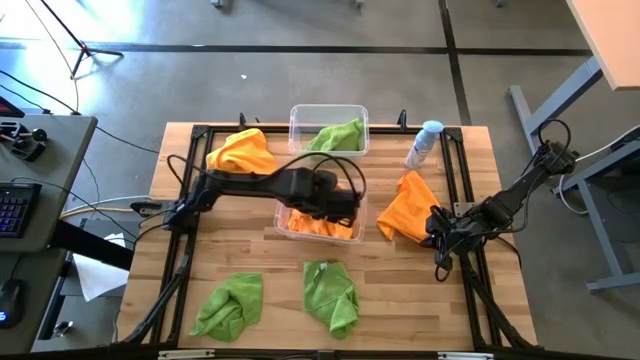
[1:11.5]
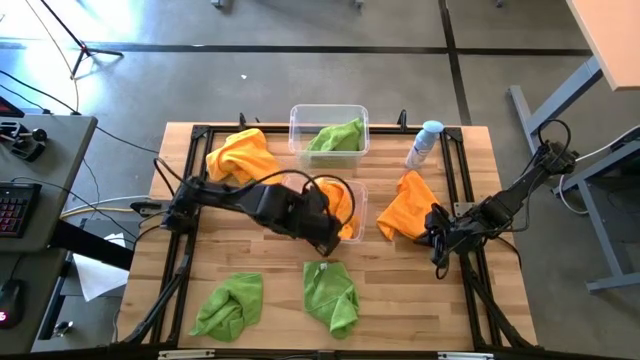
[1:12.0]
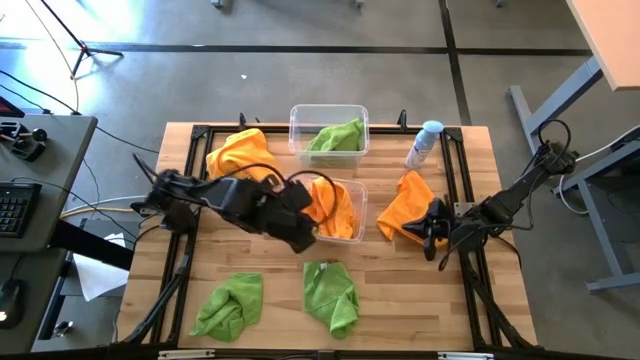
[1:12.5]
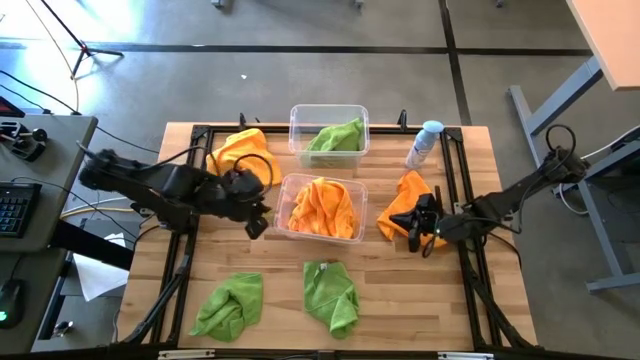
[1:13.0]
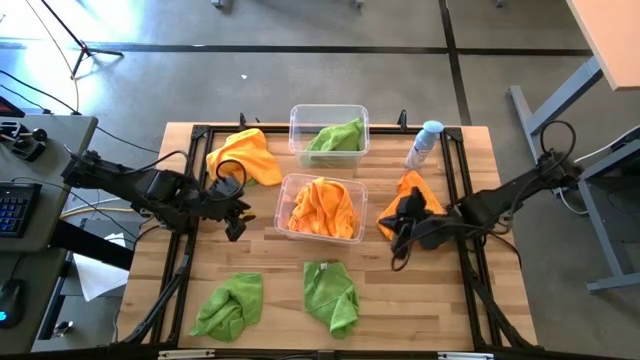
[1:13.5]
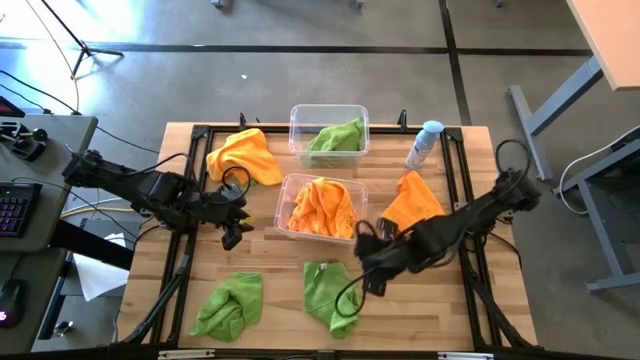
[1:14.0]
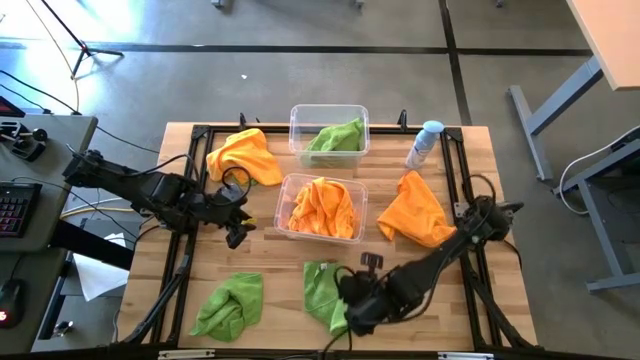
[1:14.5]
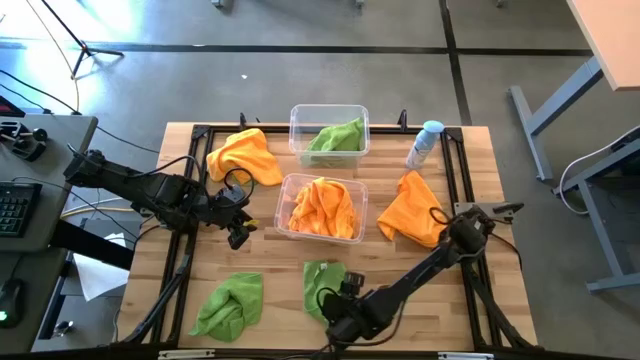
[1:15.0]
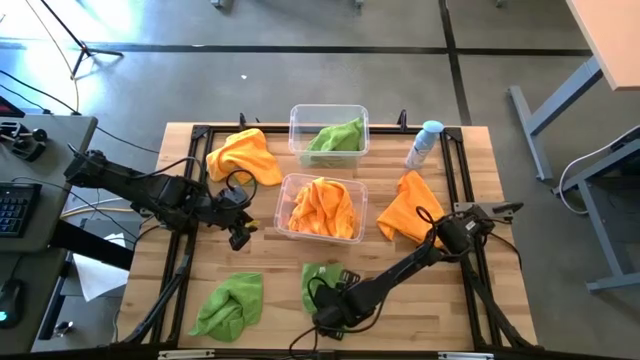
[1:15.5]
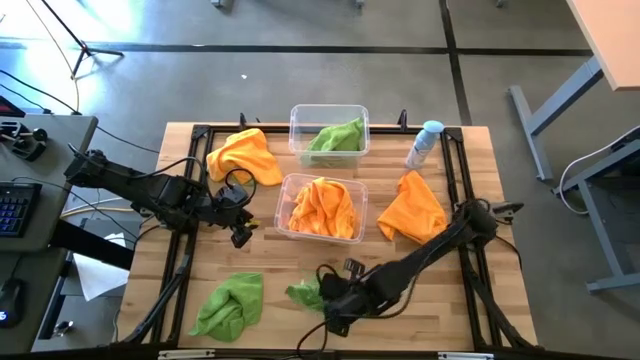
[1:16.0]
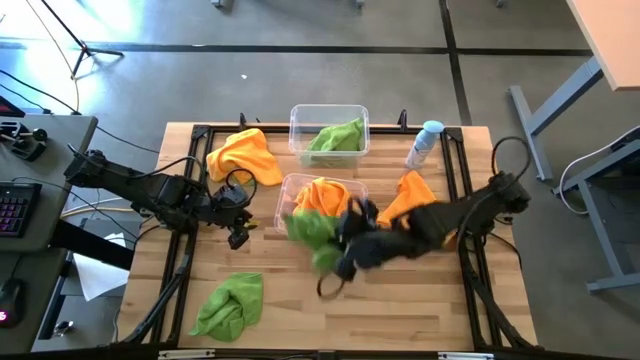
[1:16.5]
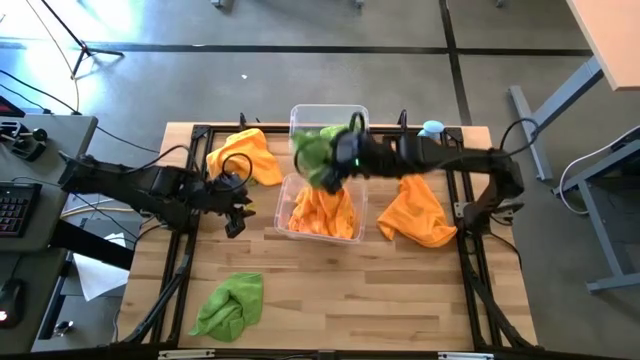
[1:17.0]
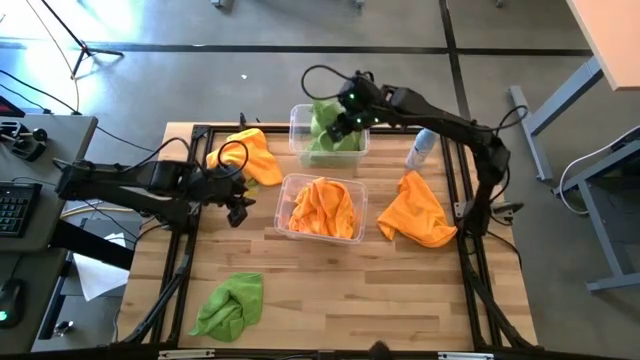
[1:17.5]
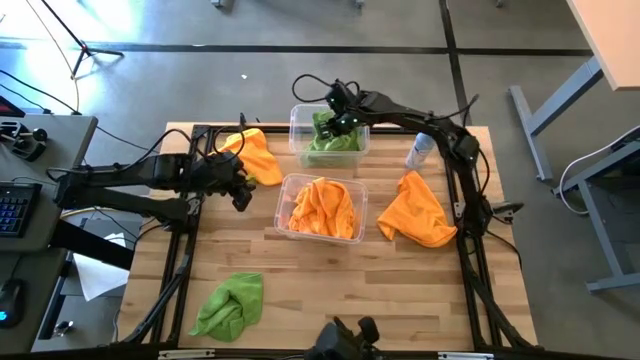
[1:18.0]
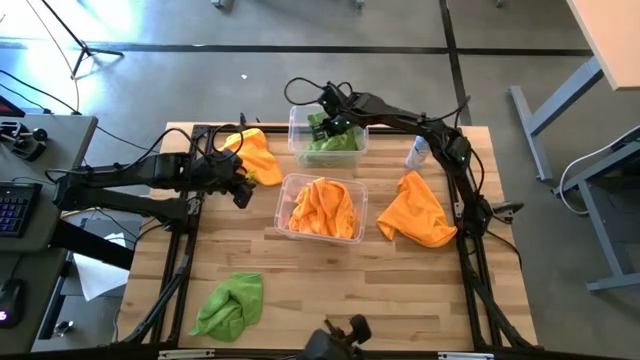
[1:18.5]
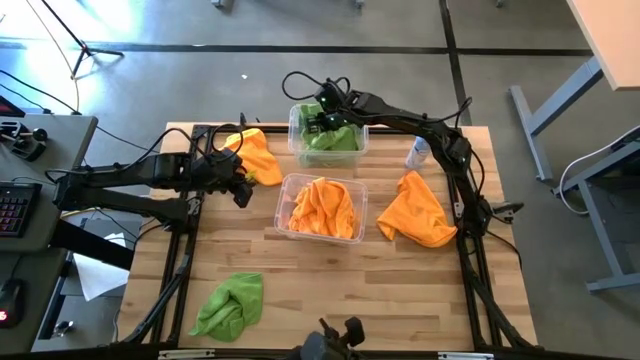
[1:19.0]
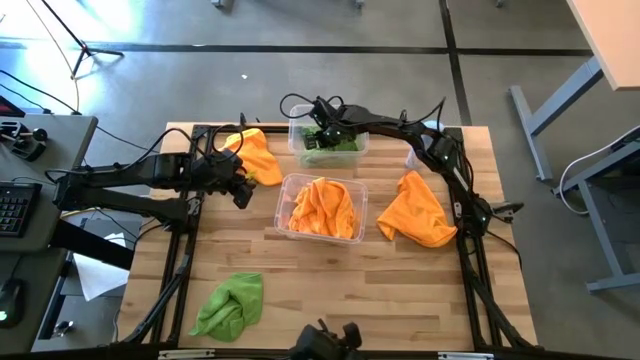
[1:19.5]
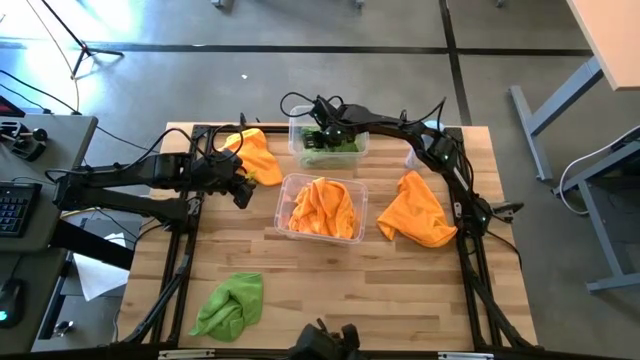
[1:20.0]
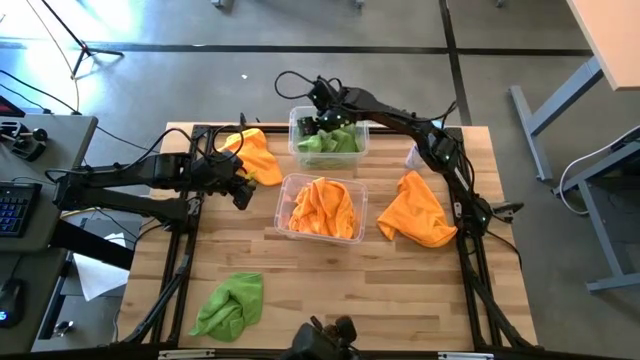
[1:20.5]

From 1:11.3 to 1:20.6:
Task: Sort microfiber towel by color & place in baskets
Put the green microfiber towel into the top transparent bin

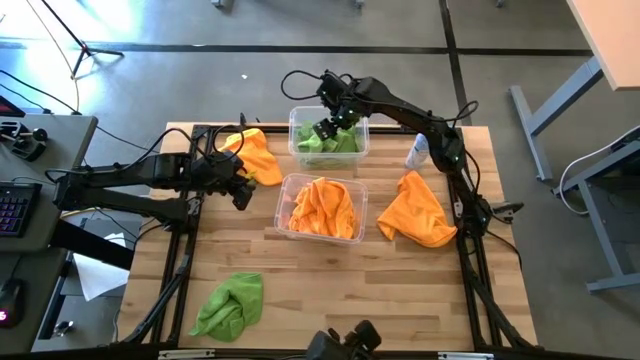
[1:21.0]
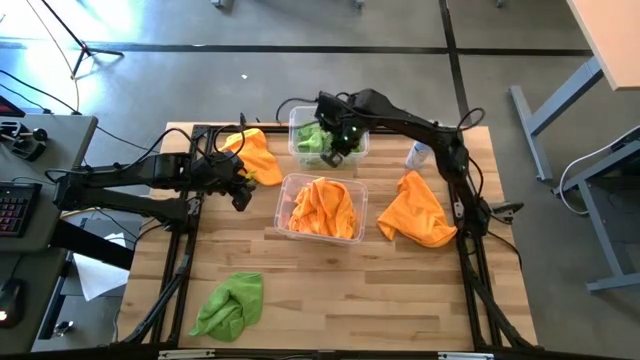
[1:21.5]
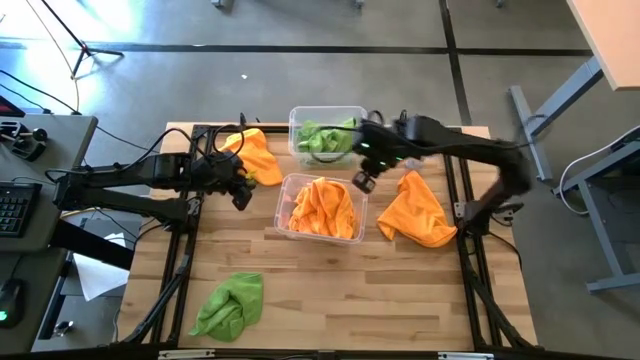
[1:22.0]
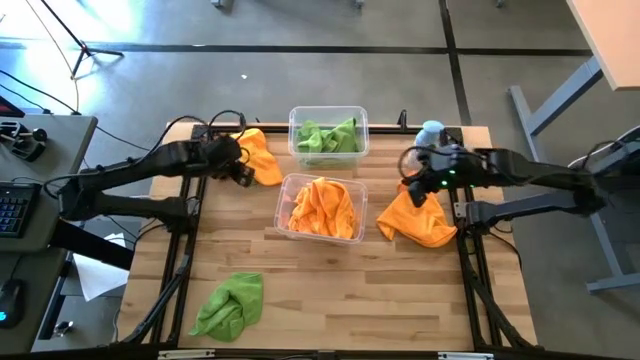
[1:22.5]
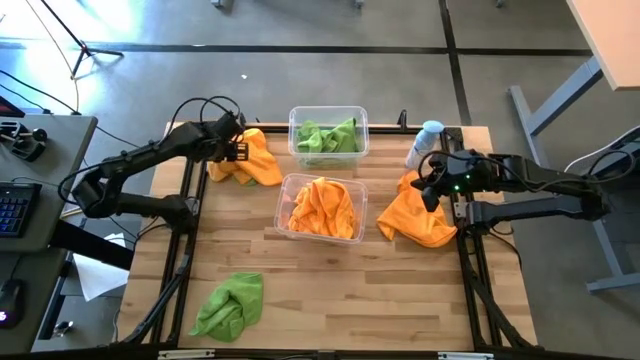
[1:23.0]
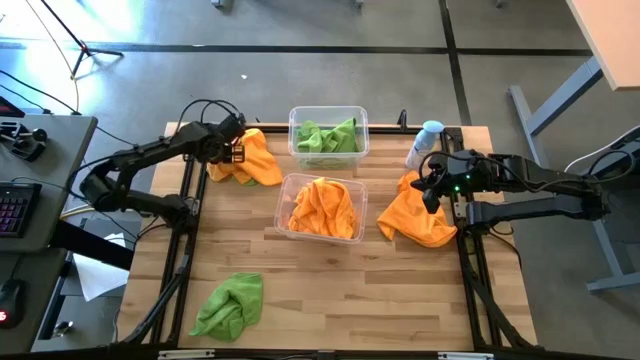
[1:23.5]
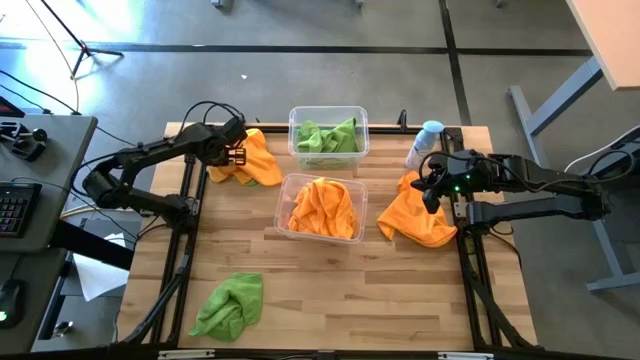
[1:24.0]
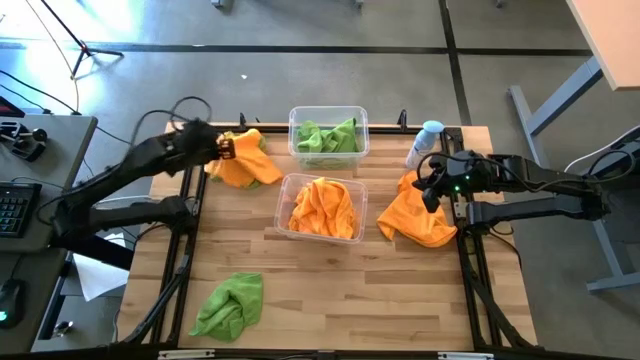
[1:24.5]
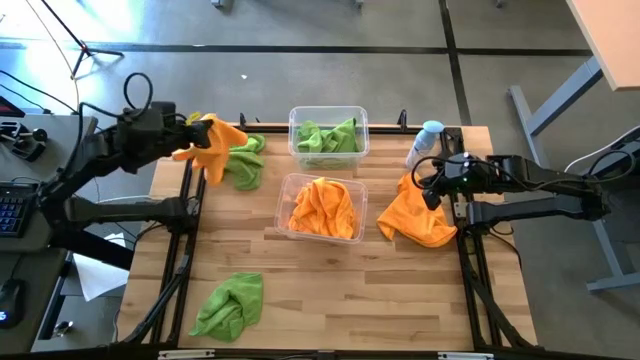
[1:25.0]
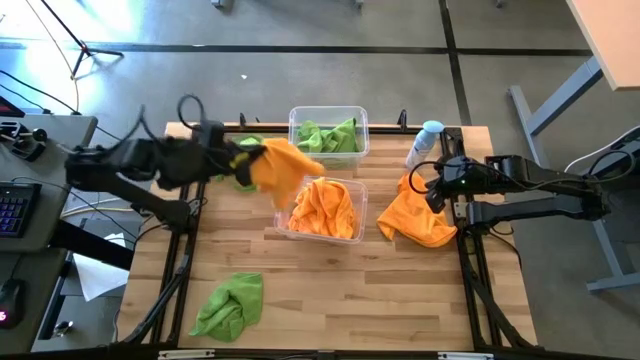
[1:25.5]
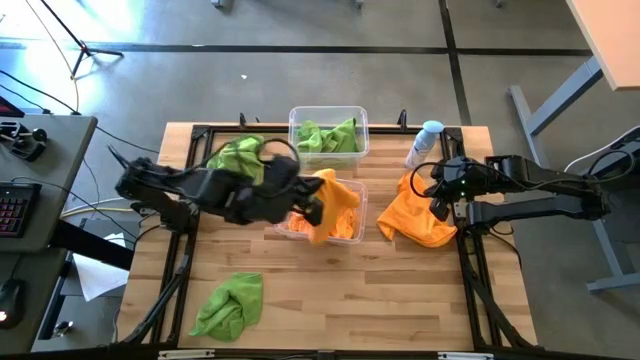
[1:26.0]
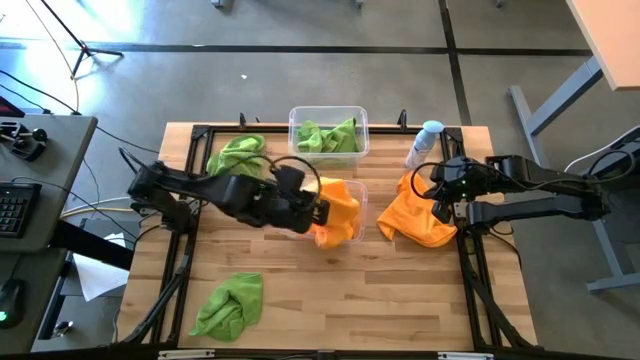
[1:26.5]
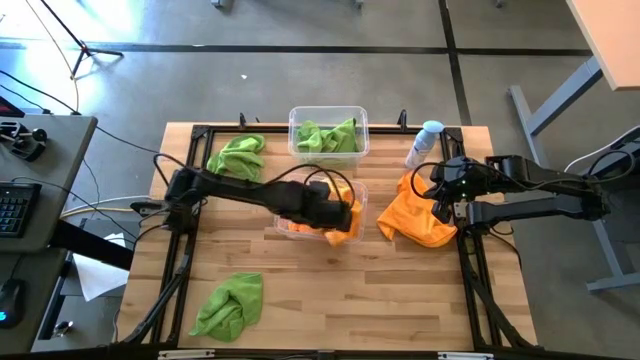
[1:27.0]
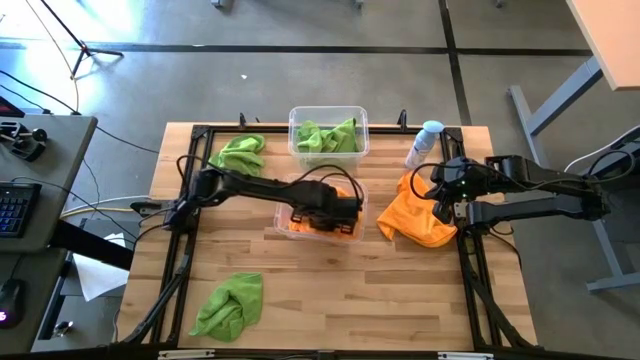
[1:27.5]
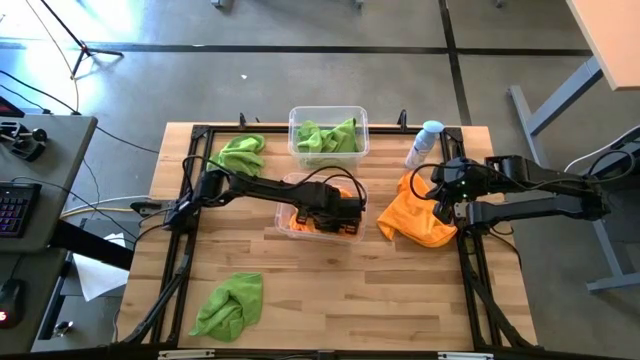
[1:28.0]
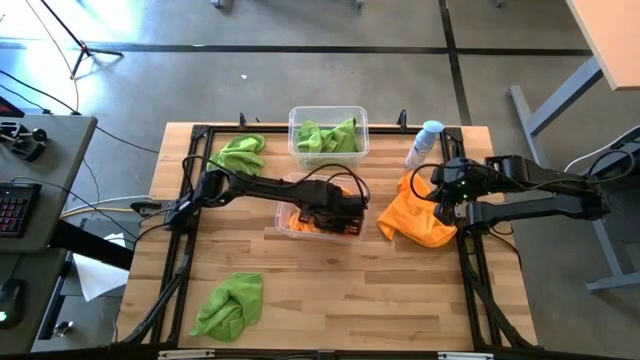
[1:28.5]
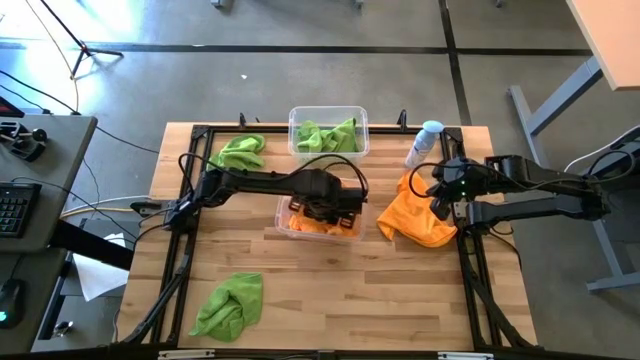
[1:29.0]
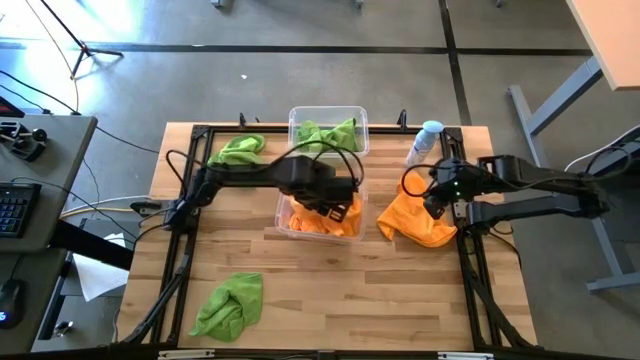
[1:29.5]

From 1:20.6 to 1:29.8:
Put the orange microfiber towel into the bottom transparent bin

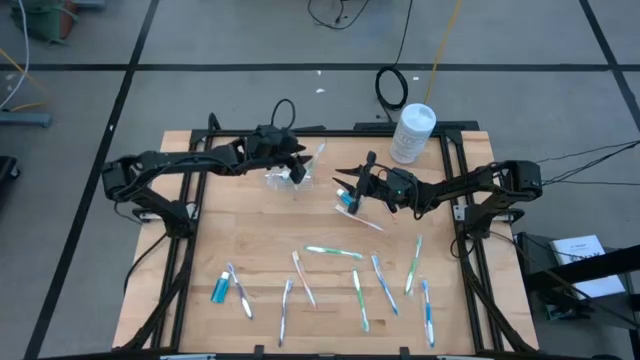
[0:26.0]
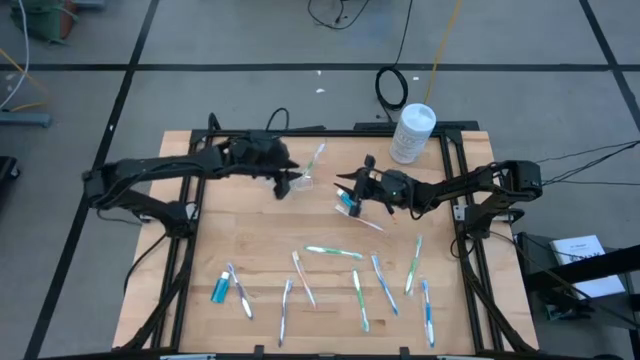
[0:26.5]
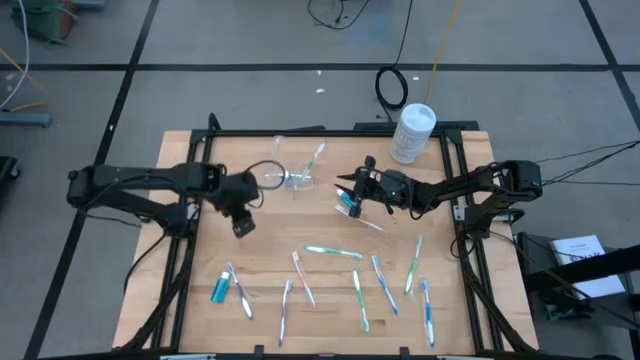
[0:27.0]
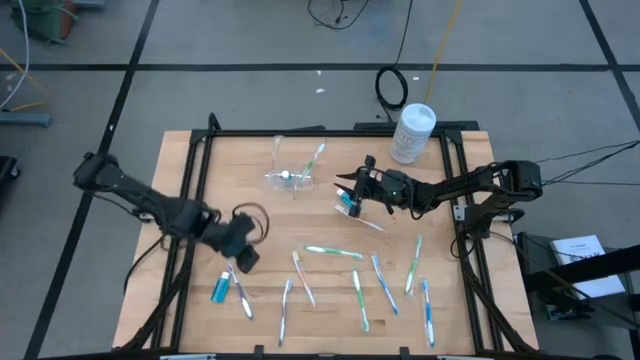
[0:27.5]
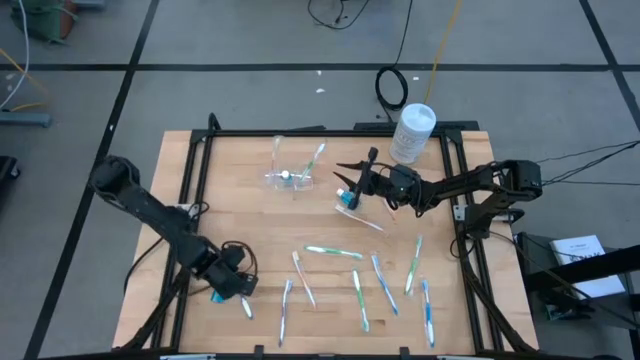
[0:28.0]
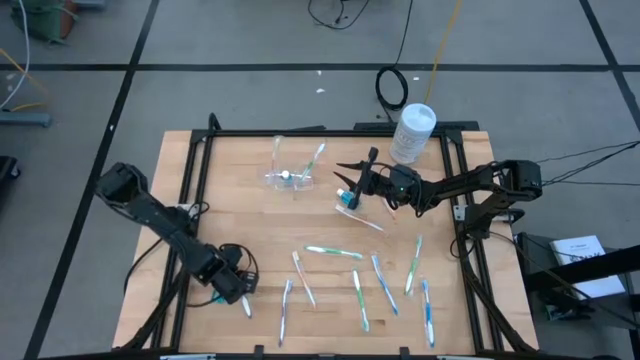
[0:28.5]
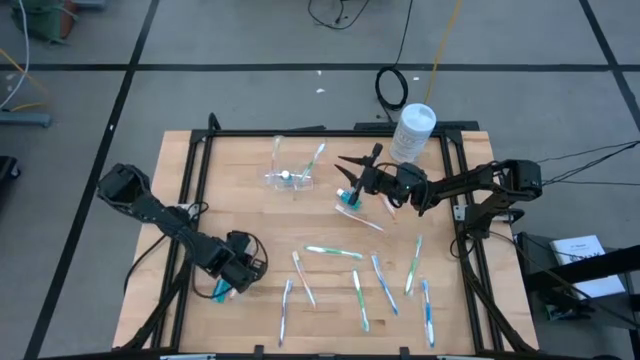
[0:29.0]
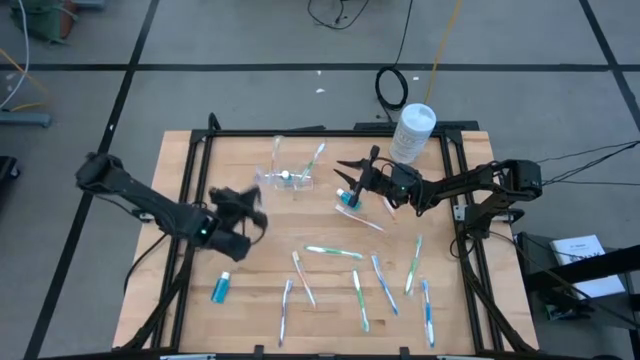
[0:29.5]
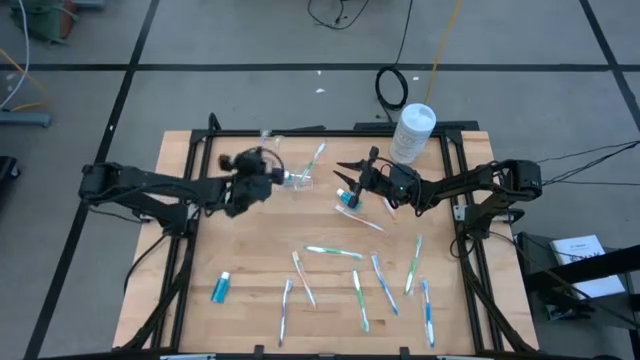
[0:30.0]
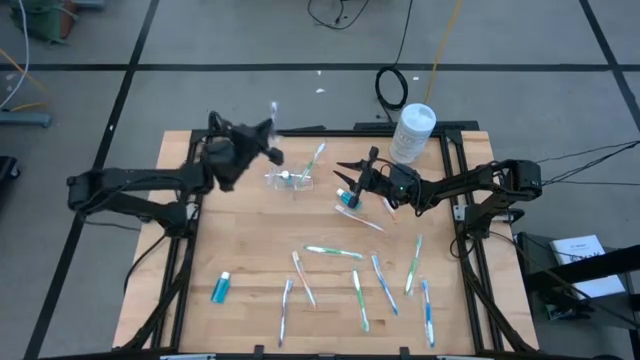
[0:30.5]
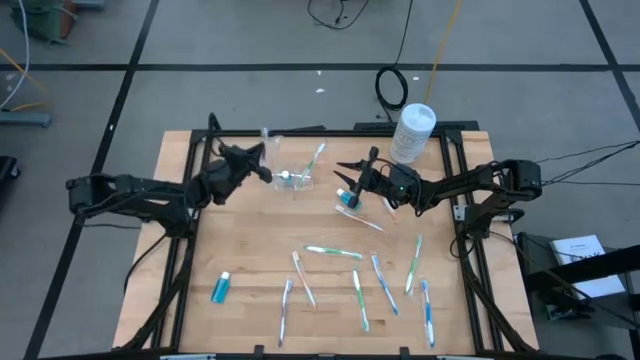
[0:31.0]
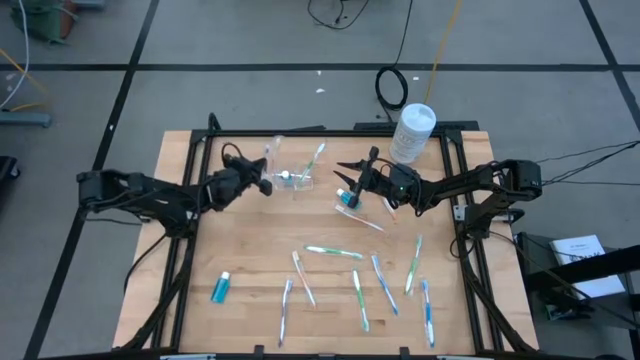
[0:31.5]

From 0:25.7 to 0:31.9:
Task: Pick & Place toothbrushing station
Put the purple toothbrush into the transparent organizer
